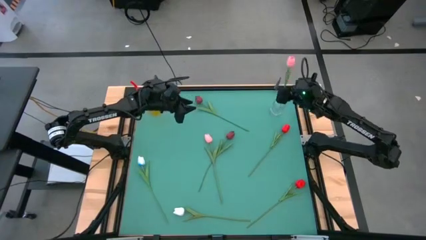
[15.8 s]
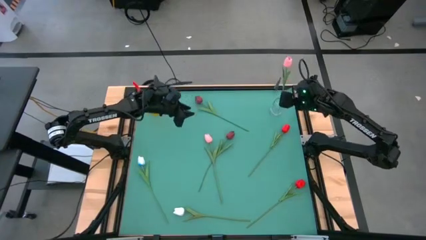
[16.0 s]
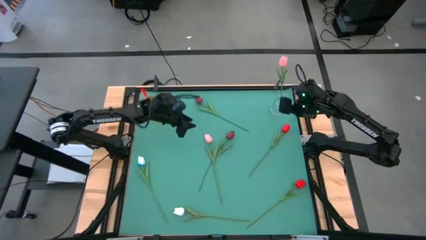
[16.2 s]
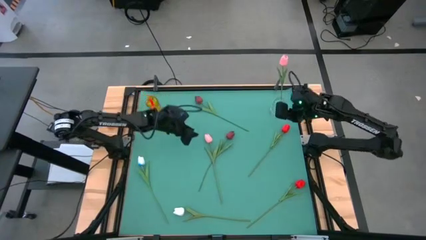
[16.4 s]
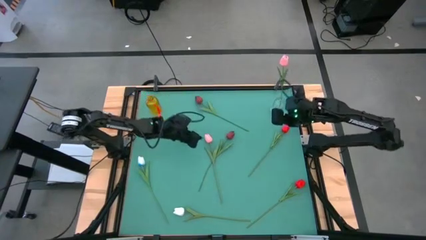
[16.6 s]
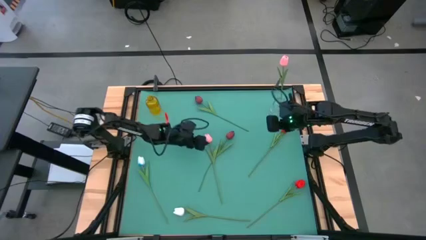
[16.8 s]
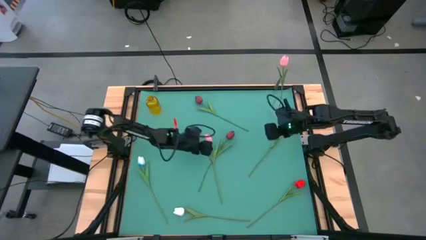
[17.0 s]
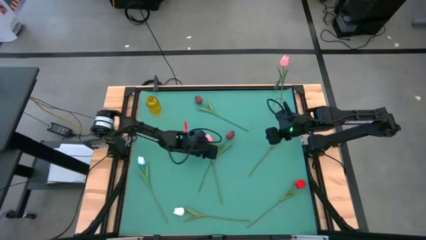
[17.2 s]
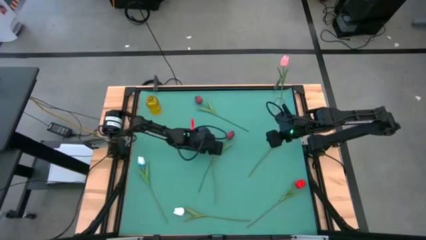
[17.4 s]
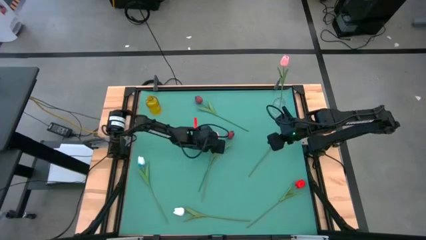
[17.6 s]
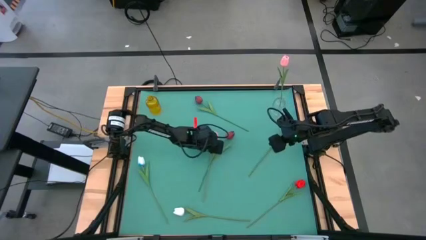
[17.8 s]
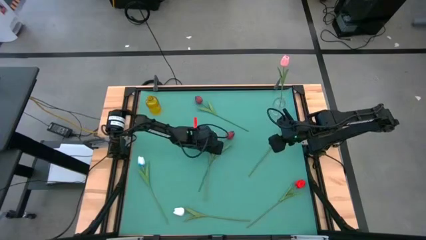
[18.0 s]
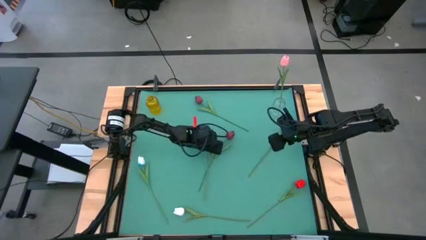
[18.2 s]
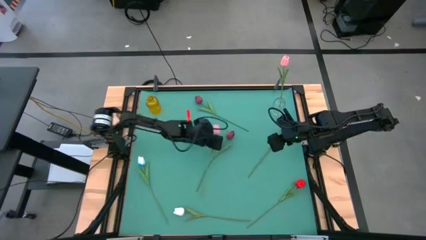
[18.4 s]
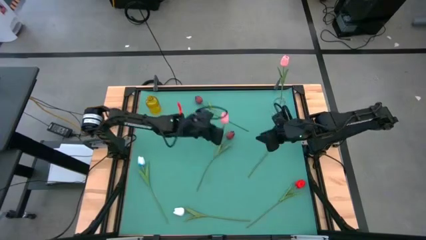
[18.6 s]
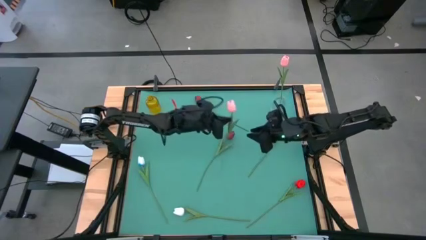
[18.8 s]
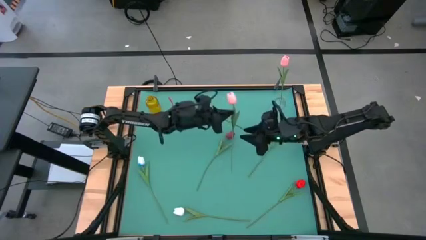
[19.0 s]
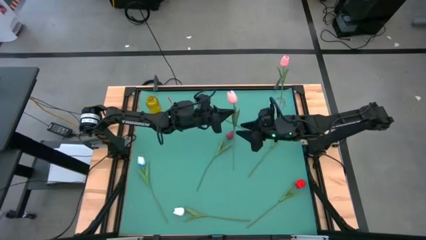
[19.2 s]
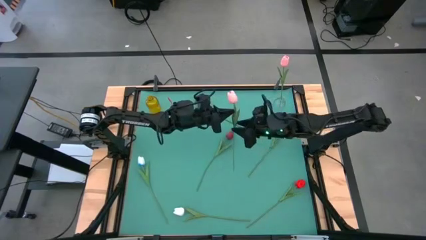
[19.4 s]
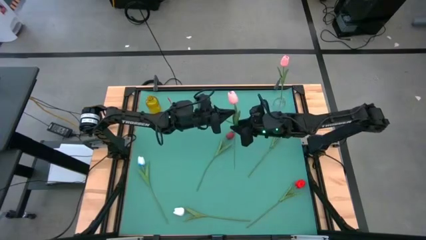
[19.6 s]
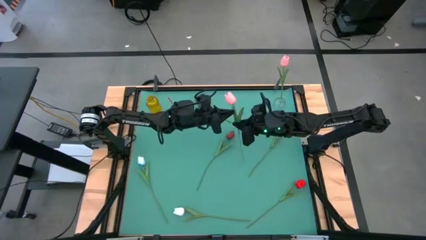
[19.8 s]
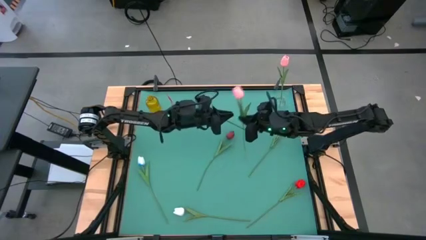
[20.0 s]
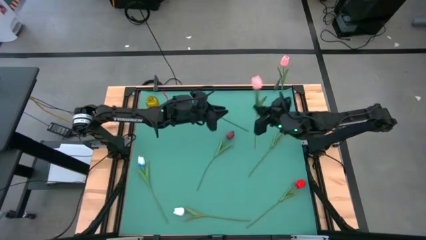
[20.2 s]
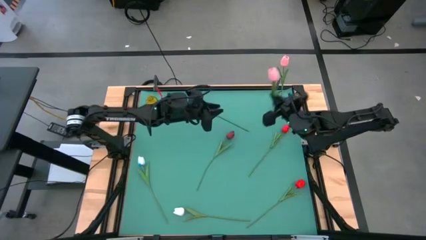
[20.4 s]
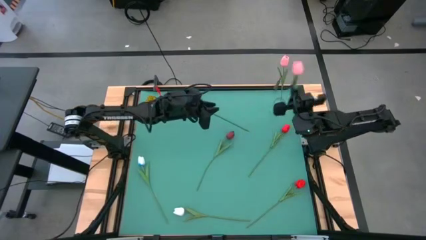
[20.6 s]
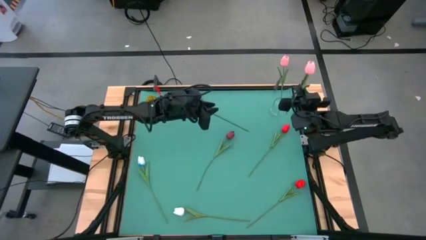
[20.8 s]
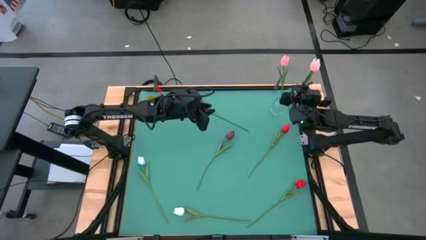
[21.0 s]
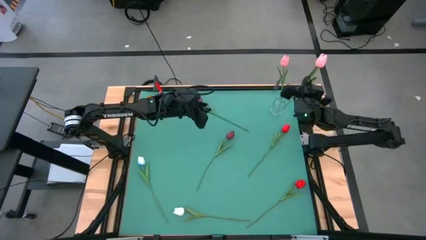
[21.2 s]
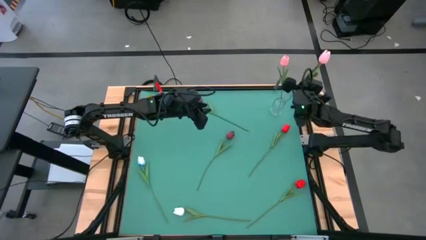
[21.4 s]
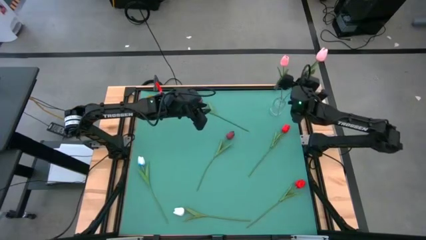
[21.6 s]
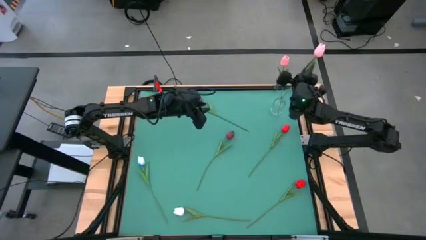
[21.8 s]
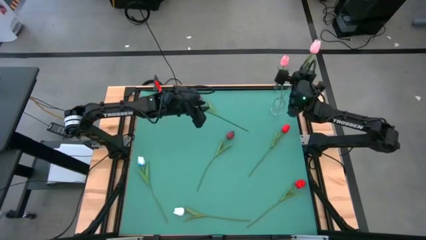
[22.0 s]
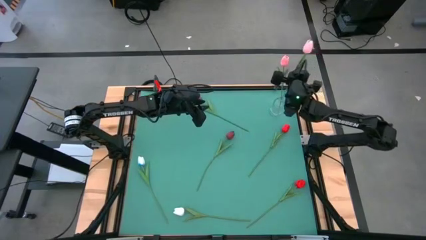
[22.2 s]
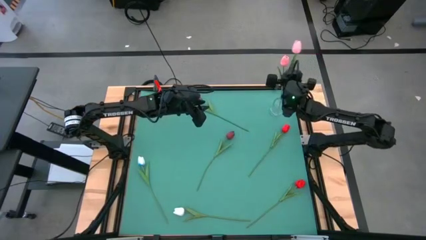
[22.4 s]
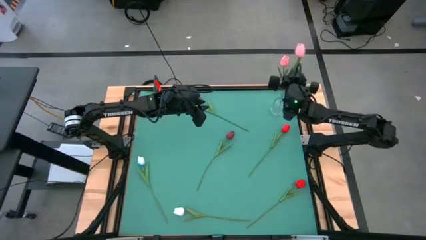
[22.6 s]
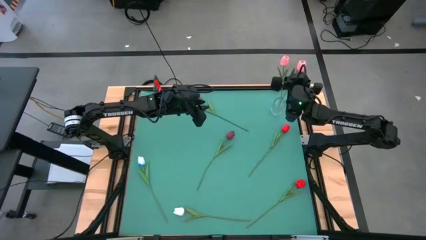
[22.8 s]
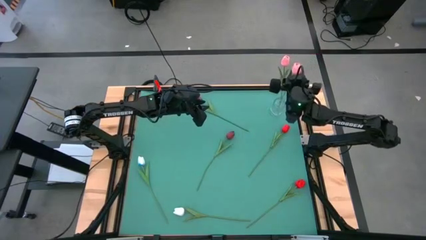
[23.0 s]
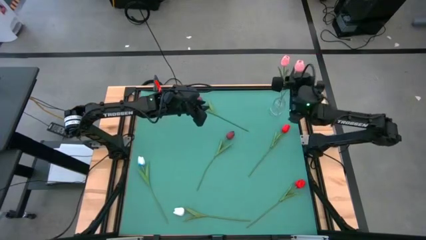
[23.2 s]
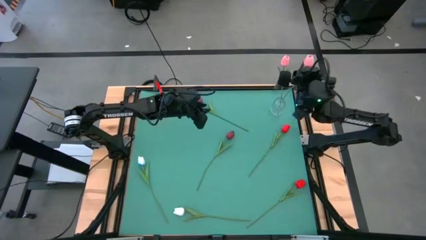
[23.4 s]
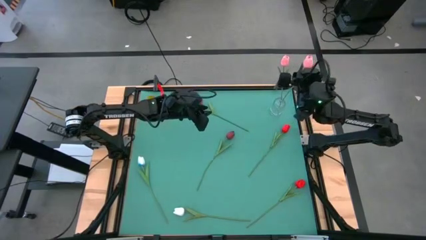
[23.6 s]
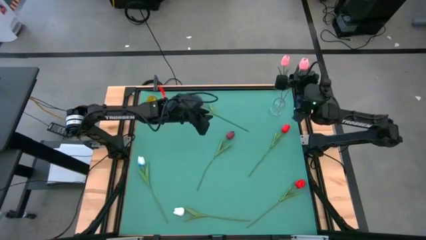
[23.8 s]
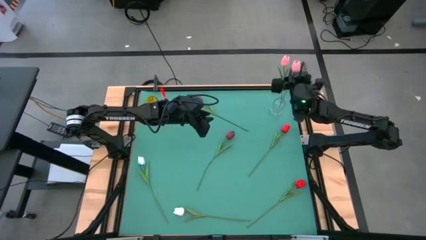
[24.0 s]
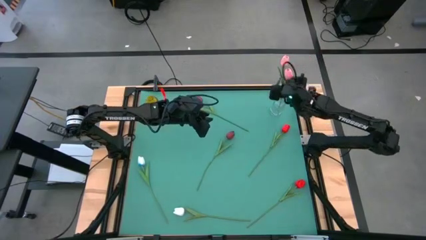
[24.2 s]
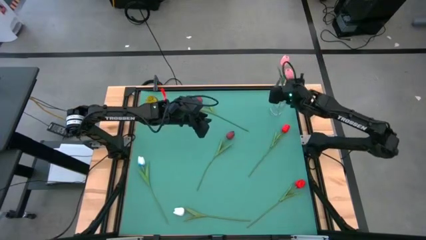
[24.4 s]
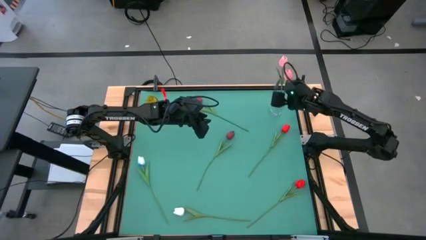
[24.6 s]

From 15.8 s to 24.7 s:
Task: Sort flowers into vase by color
Put the pink flower into the transparent vase

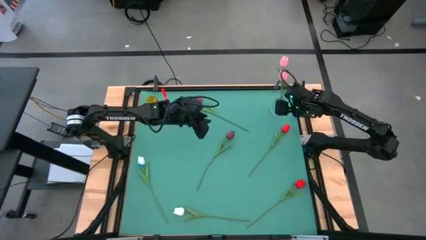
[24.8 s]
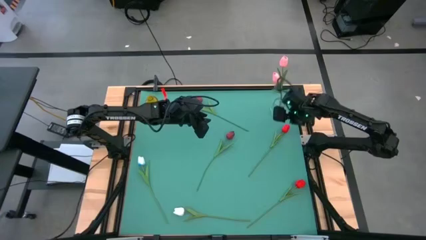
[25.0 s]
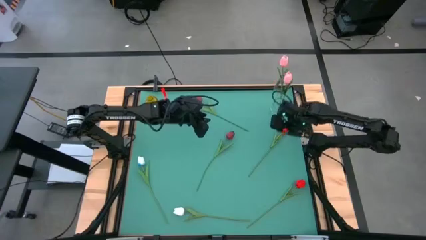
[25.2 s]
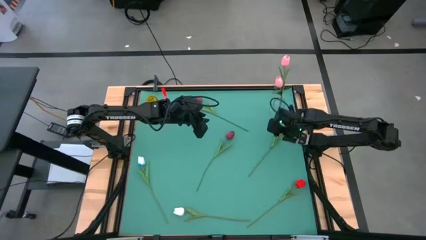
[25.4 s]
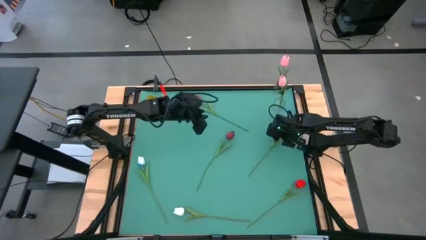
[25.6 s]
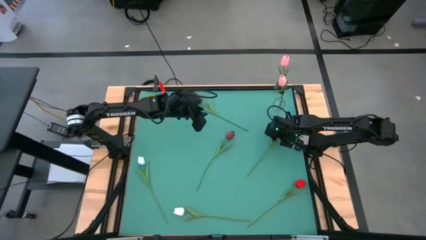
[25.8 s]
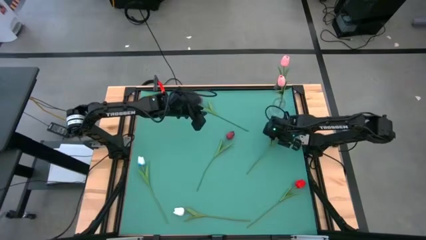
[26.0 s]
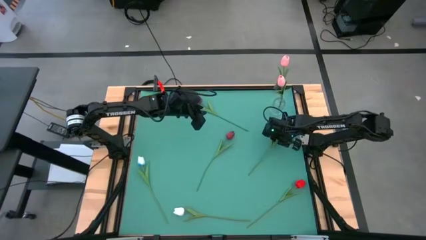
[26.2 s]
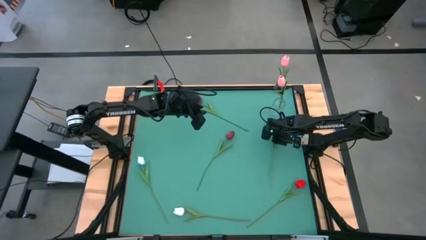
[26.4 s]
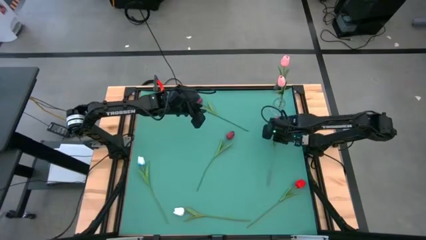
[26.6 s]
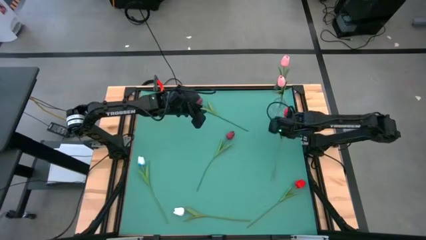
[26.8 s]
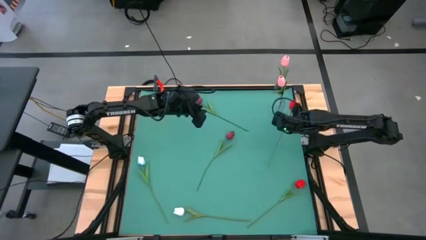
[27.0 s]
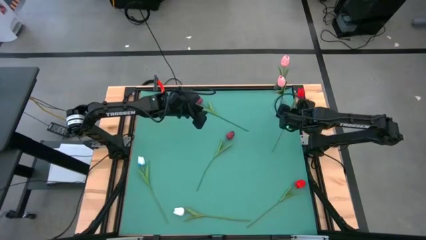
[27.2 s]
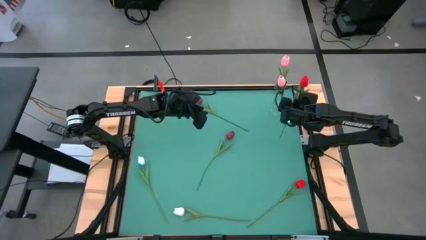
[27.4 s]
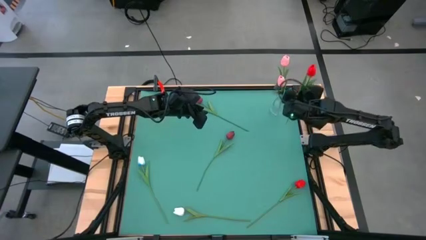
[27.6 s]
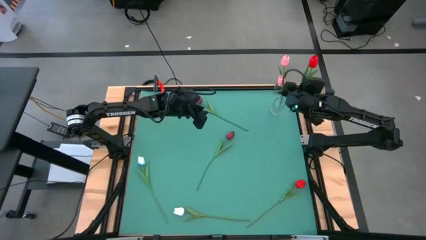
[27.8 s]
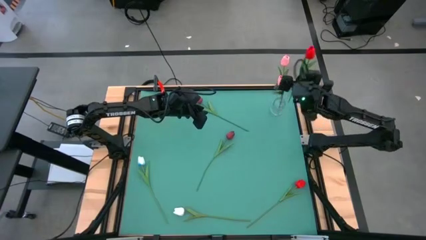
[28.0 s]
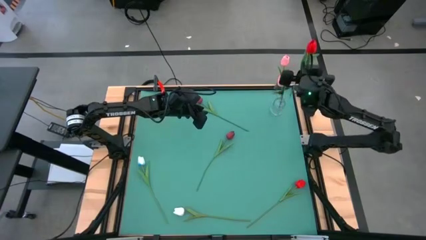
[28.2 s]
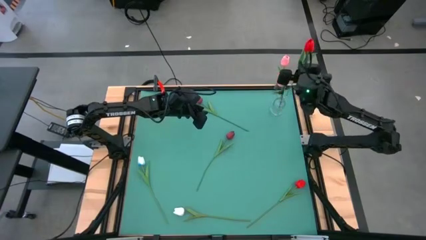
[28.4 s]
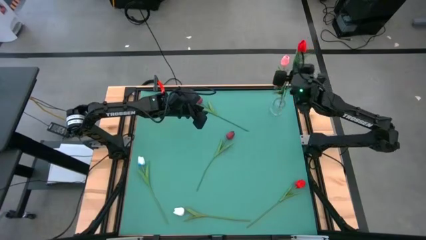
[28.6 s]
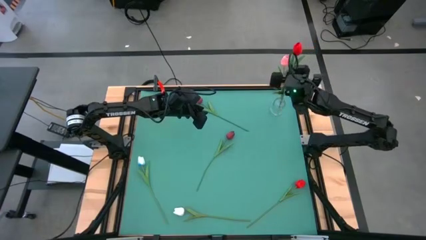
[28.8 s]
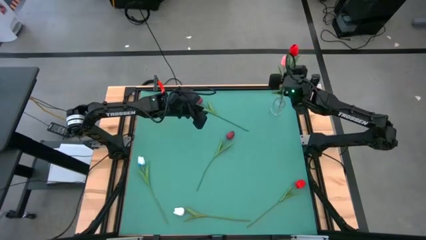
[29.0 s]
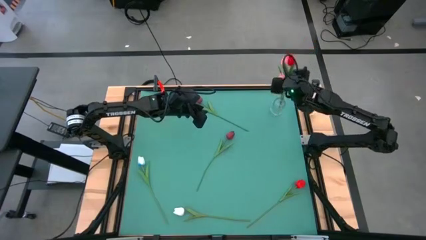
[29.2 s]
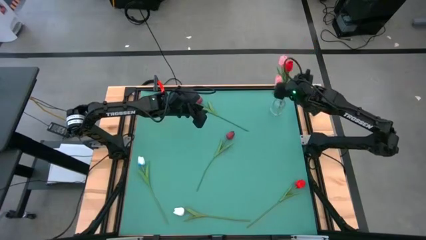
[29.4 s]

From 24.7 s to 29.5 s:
Put the top red flower into the transparent vase
